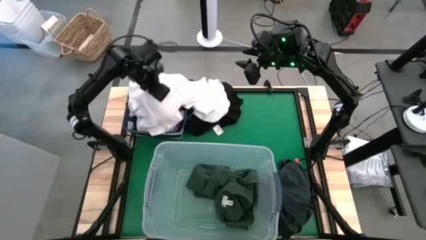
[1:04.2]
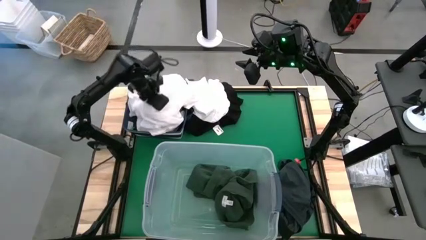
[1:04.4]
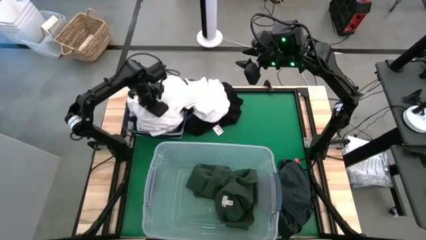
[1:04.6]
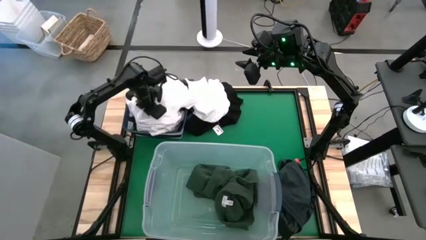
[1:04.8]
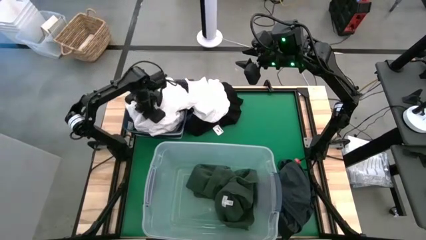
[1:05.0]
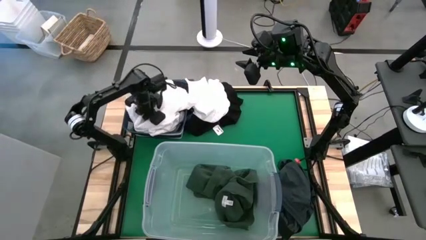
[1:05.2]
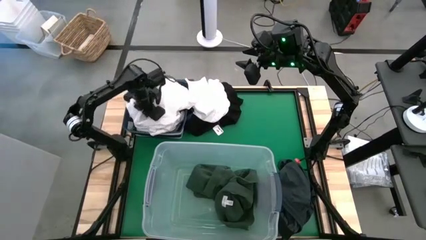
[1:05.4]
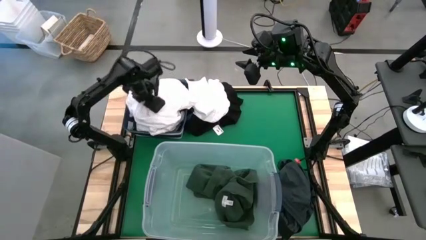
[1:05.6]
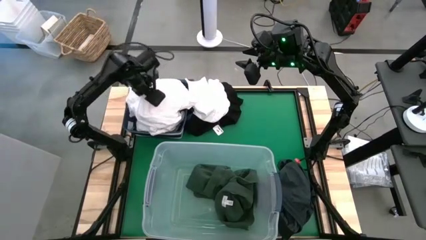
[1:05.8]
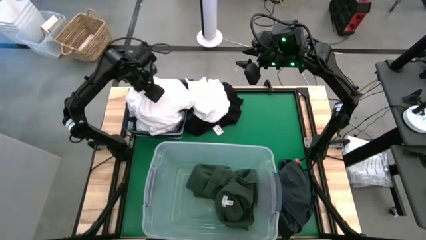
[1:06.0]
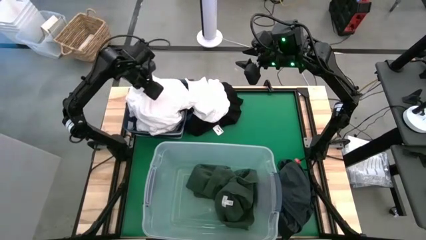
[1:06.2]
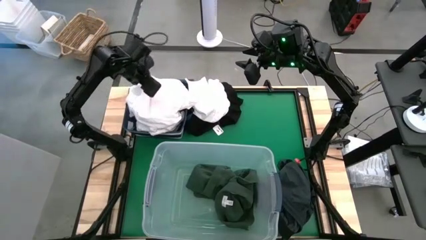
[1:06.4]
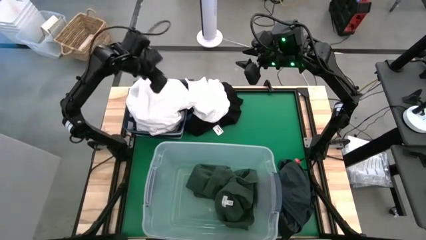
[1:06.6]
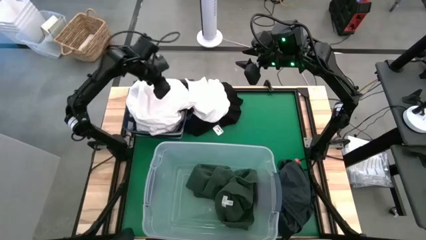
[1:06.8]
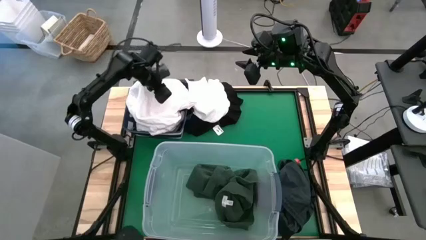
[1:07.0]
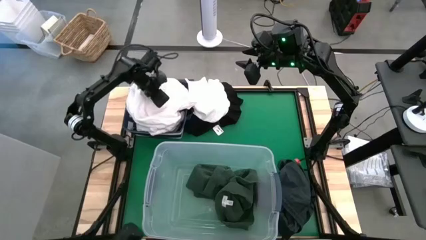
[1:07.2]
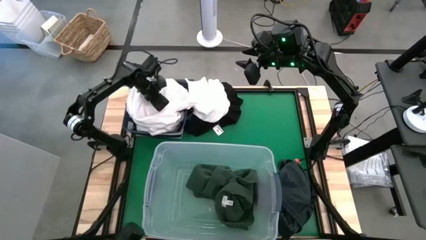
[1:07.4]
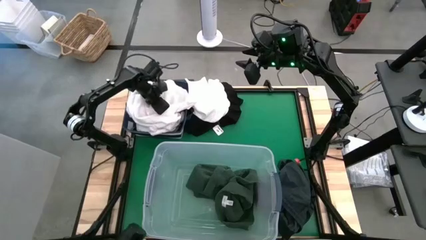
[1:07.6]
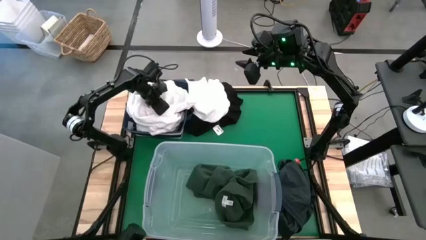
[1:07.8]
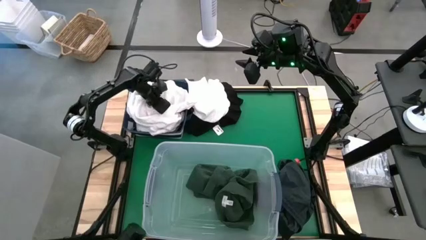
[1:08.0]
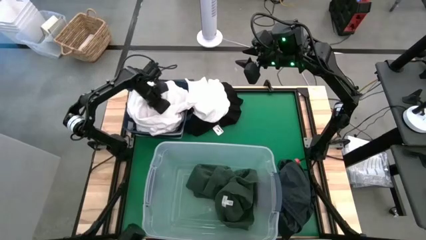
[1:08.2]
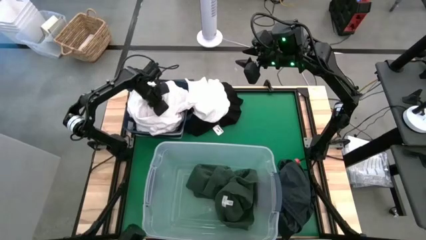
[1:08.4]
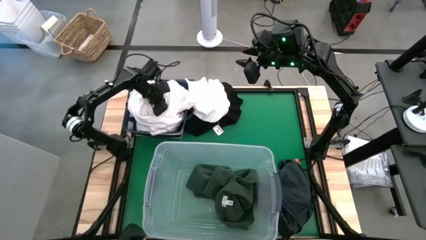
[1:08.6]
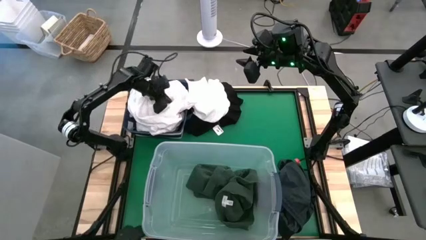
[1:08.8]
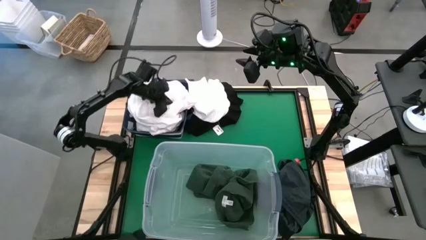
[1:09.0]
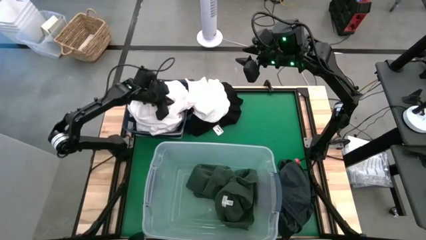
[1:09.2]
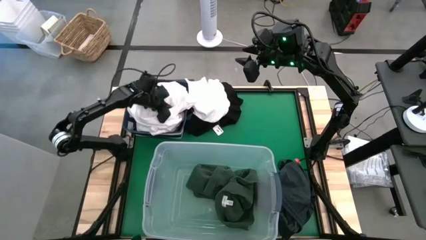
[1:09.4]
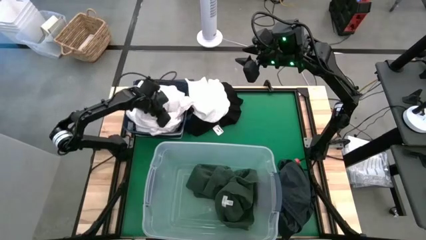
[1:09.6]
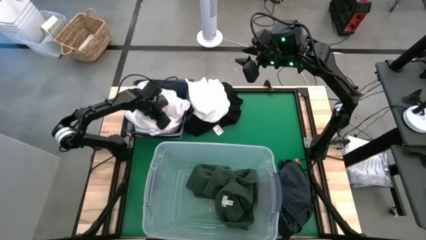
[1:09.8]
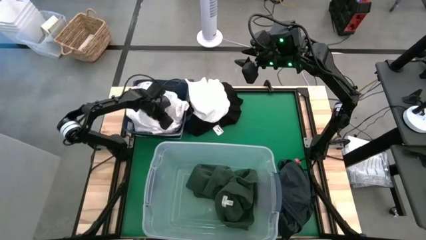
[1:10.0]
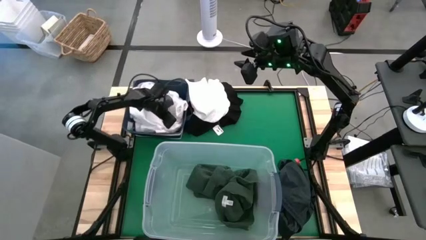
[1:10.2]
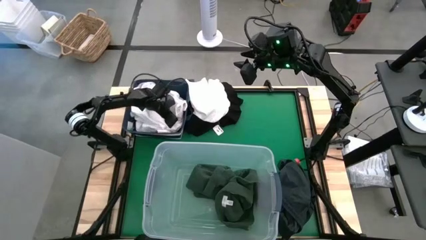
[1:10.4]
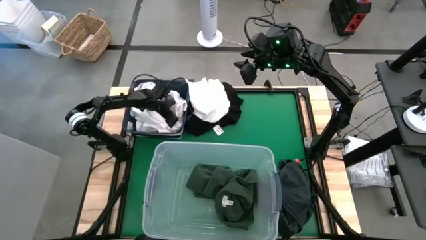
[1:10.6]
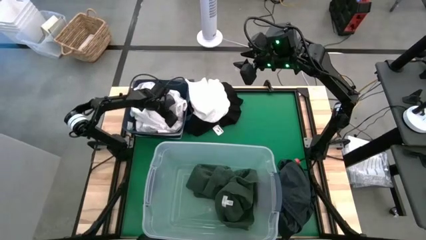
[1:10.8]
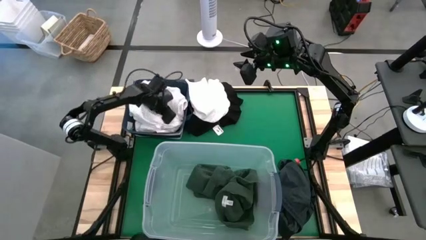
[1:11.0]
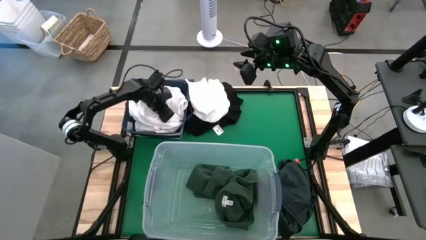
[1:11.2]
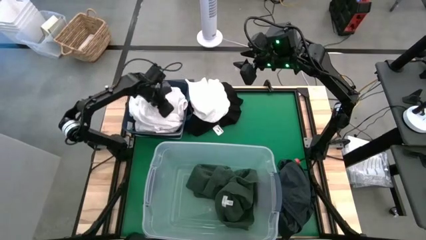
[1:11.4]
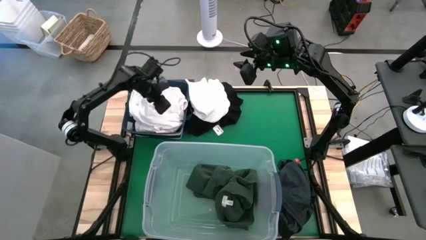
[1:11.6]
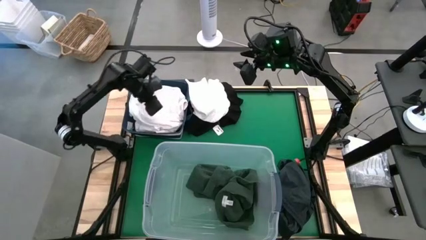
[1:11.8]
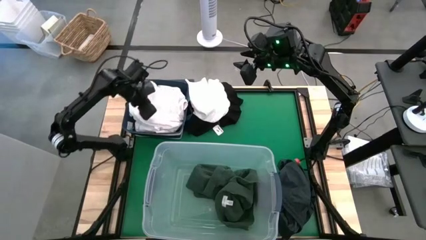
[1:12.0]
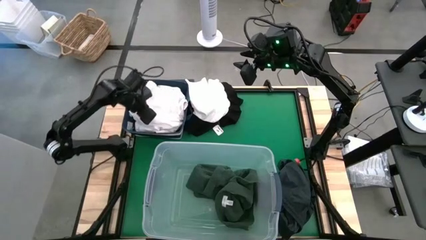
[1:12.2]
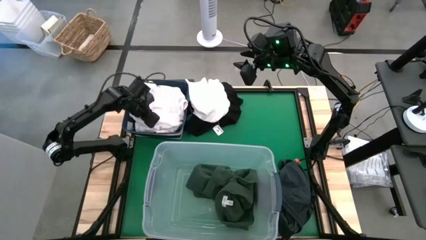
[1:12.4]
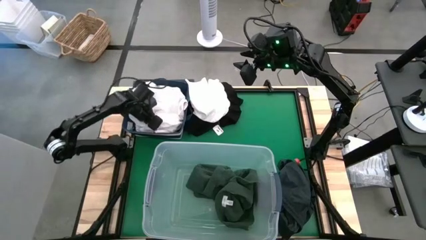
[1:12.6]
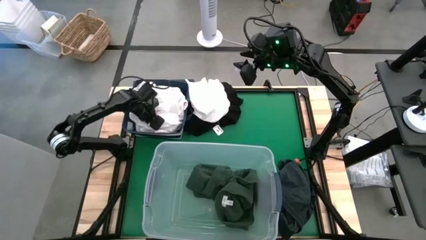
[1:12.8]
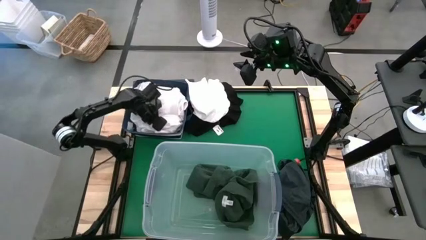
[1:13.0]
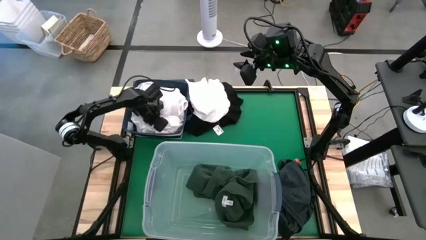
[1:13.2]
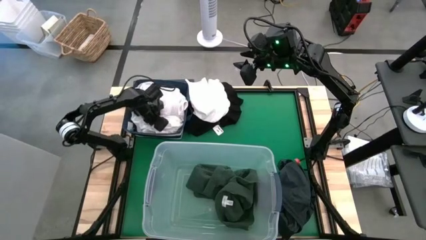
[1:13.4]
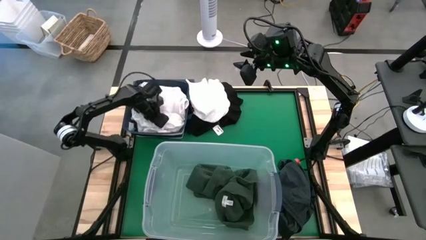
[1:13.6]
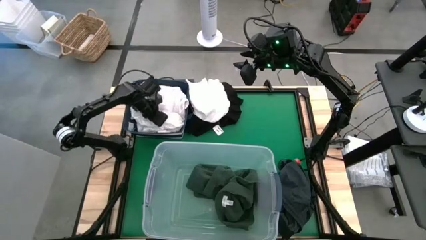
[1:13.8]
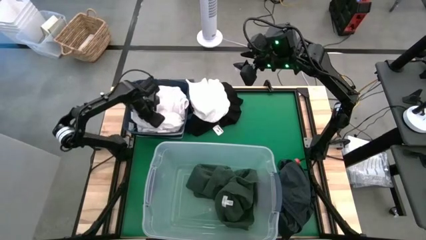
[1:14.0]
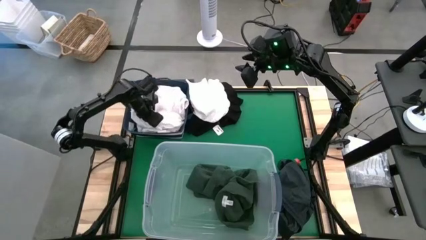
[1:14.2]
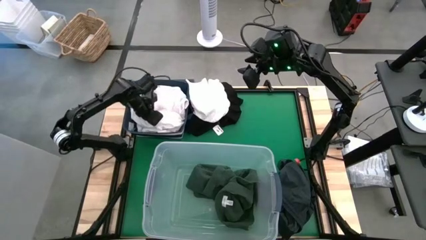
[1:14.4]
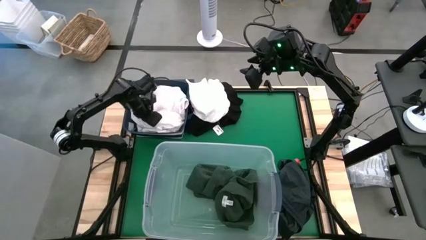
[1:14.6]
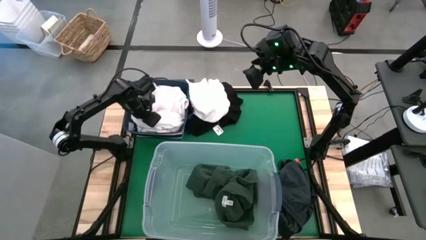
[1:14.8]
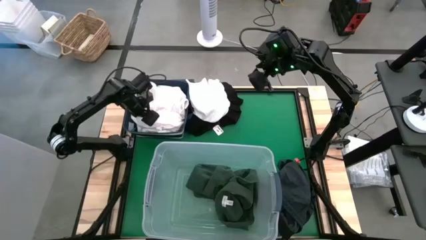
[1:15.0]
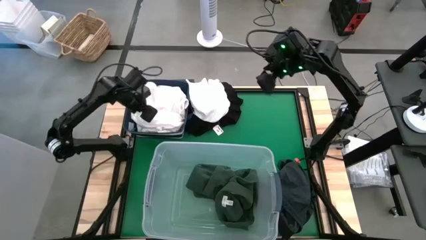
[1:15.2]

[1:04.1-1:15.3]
Put the white shirt into the blue laundry bin
